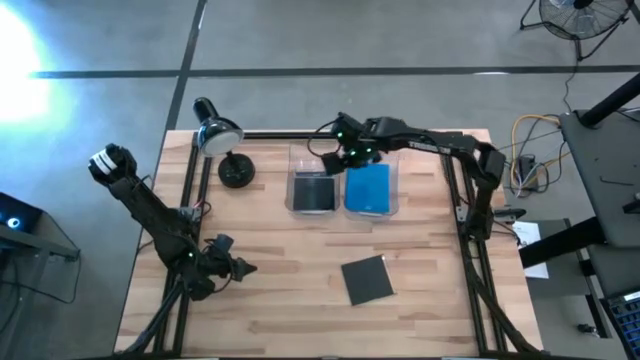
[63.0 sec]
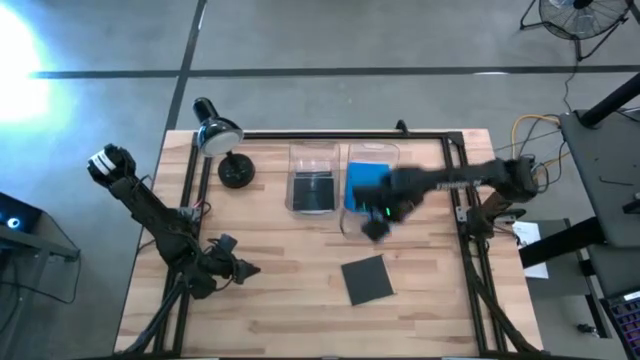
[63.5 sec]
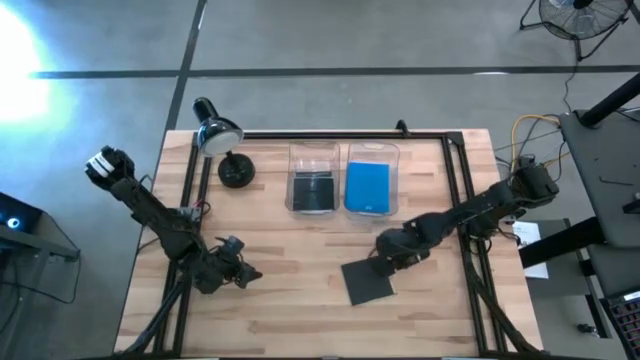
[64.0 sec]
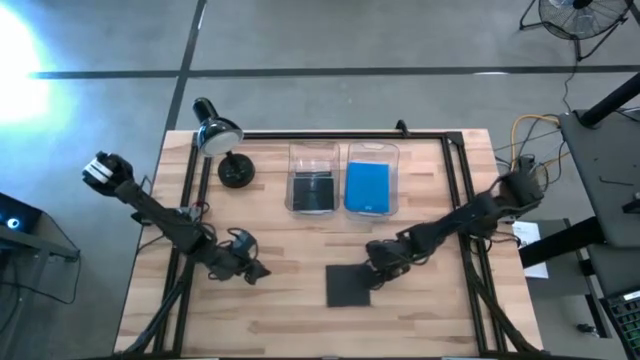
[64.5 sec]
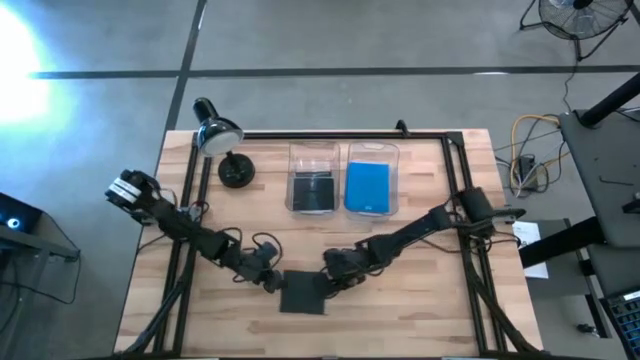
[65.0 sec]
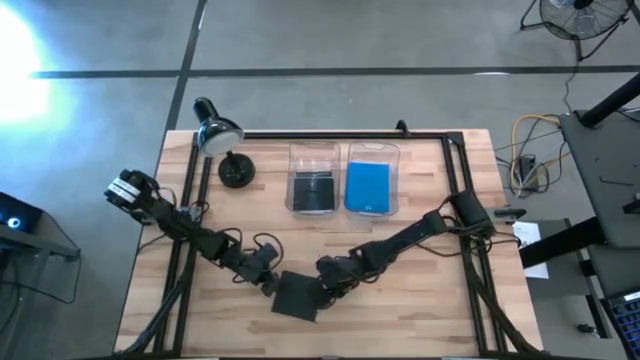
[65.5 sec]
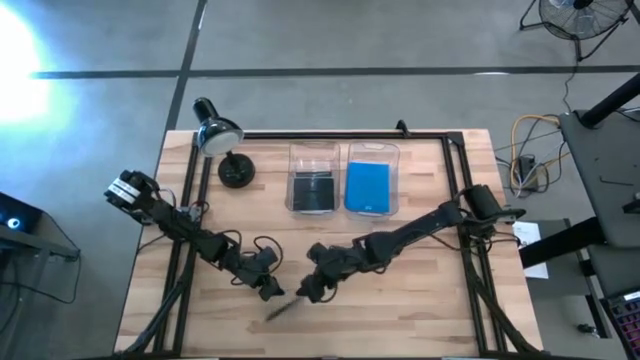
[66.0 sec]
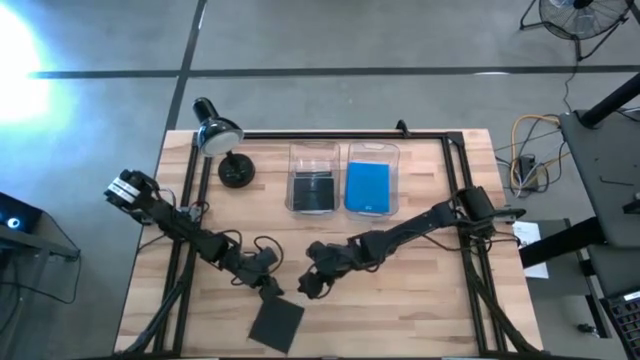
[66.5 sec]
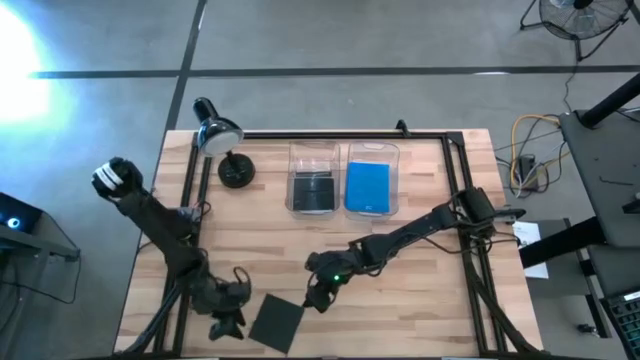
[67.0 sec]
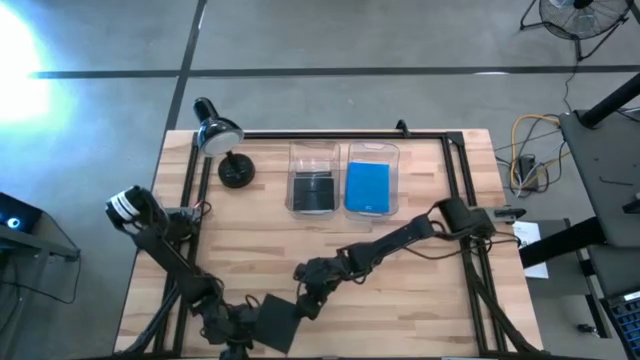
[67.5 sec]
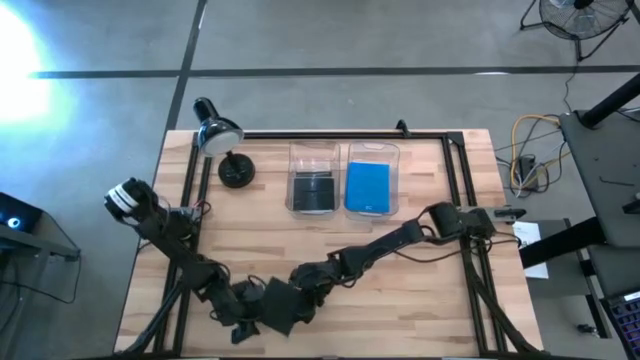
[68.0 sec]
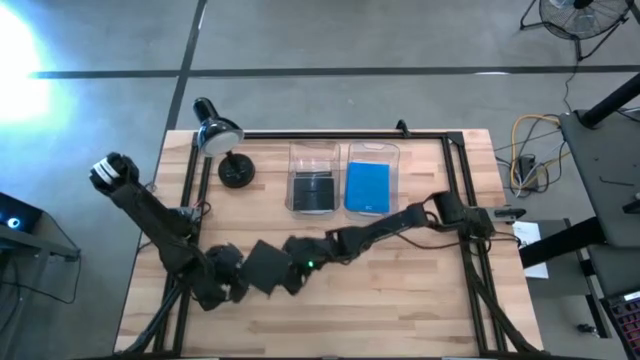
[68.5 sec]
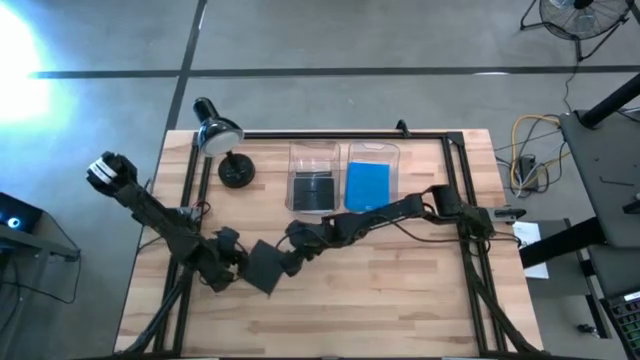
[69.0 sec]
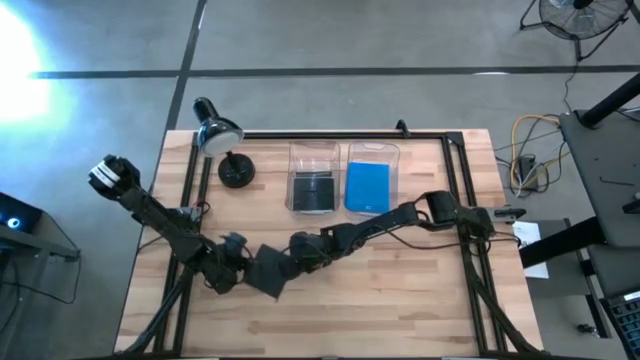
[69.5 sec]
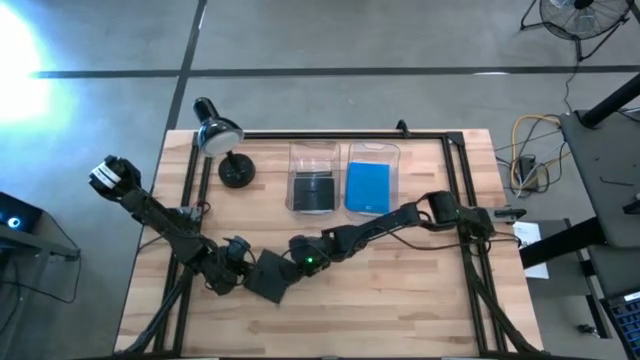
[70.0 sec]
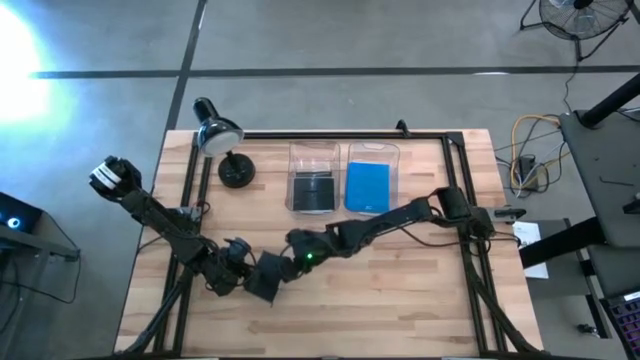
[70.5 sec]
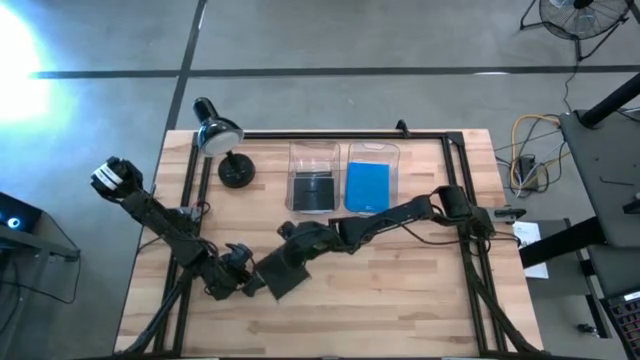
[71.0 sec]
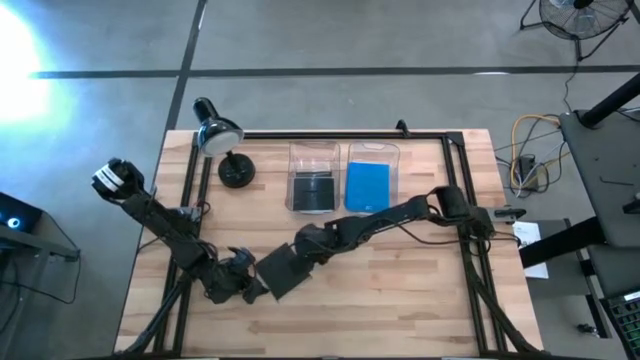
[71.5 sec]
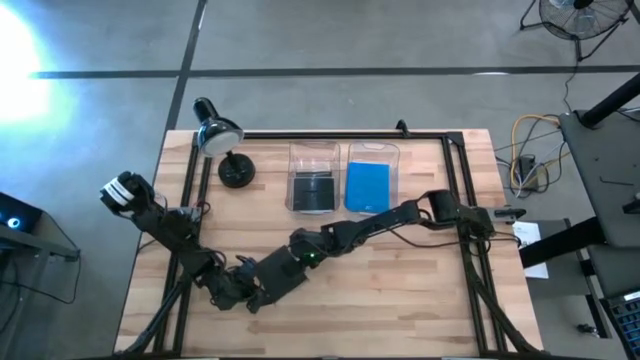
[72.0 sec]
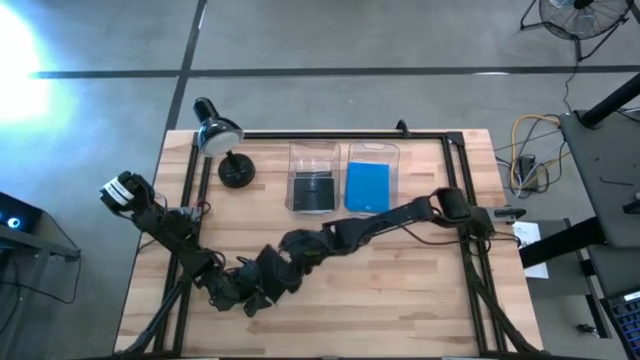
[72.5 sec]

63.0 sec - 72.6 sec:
Task: Pick & place jewel cases by type
Put the black CD case into the left transparent bin

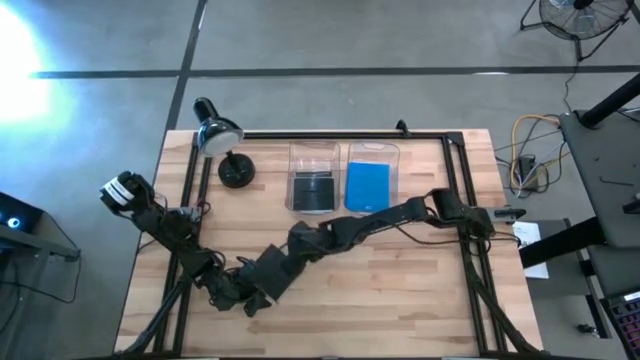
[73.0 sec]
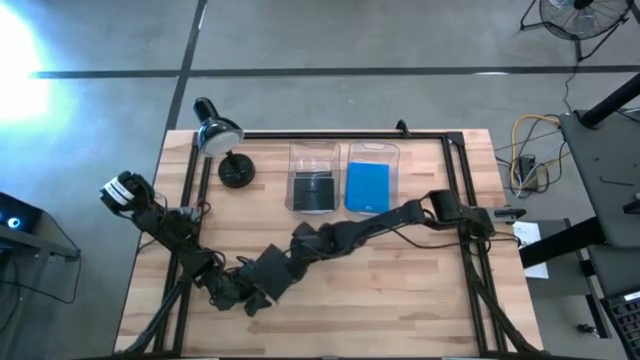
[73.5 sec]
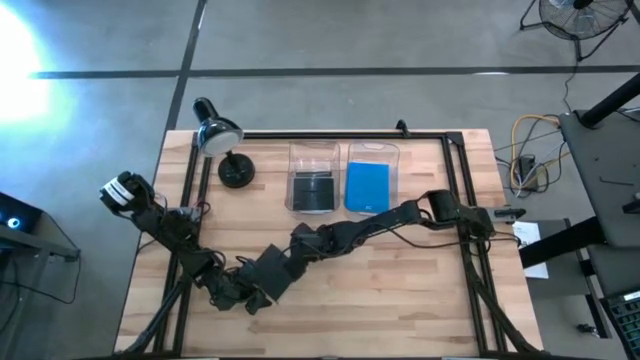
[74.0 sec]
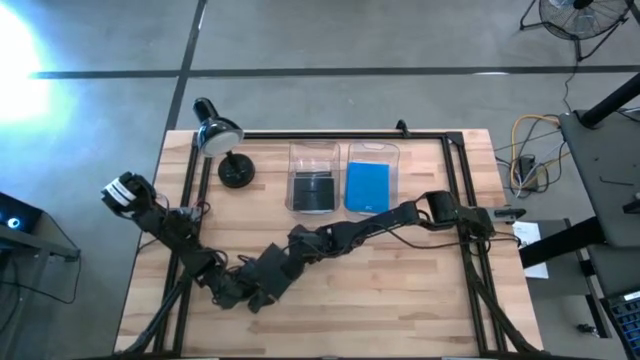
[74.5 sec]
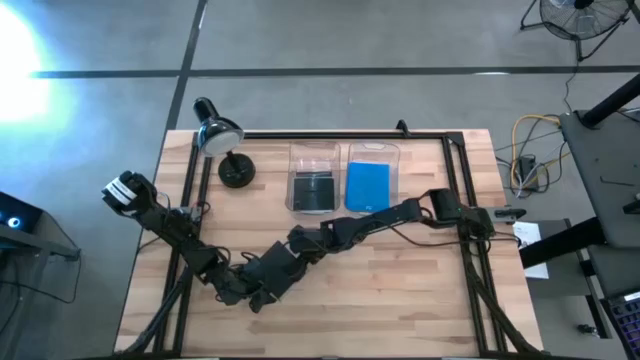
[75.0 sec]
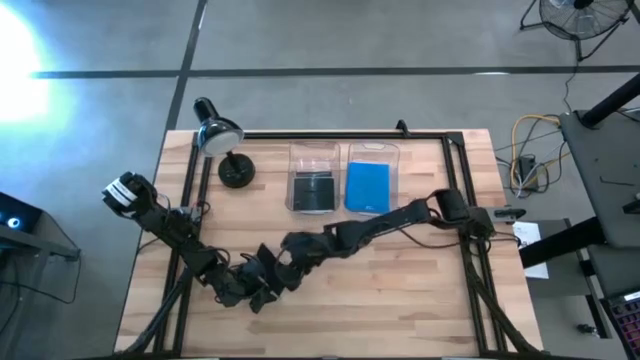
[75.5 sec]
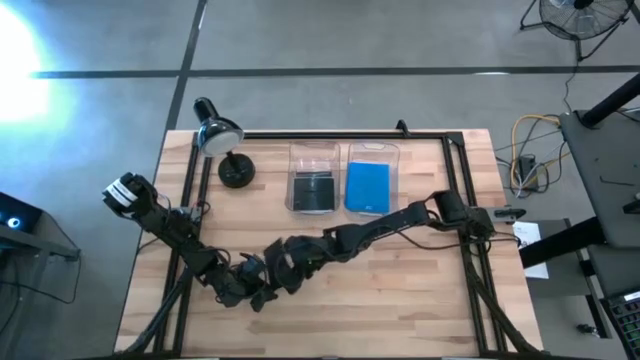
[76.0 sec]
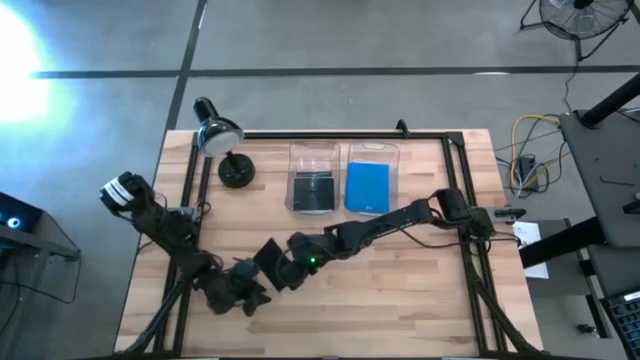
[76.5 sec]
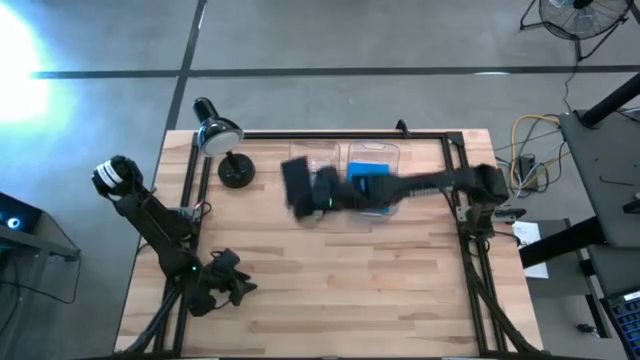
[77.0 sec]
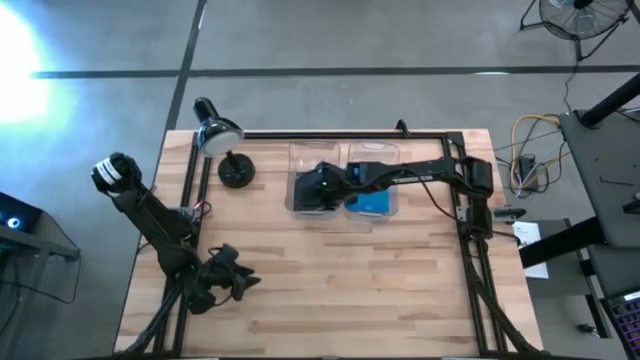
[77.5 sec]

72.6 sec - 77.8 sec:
Put the black CD case into the left transparent bin

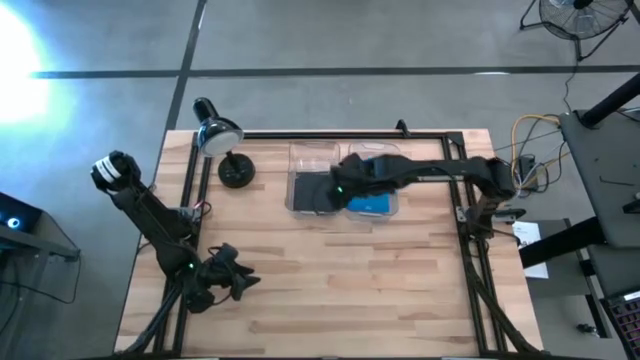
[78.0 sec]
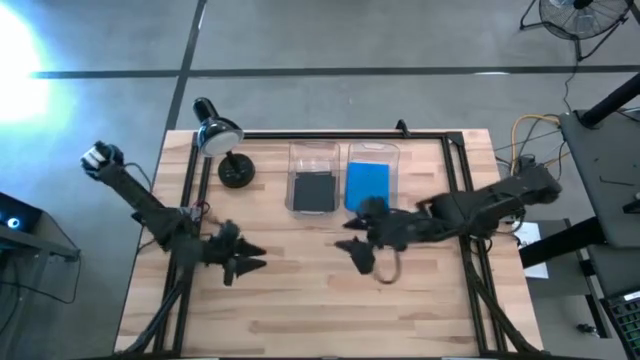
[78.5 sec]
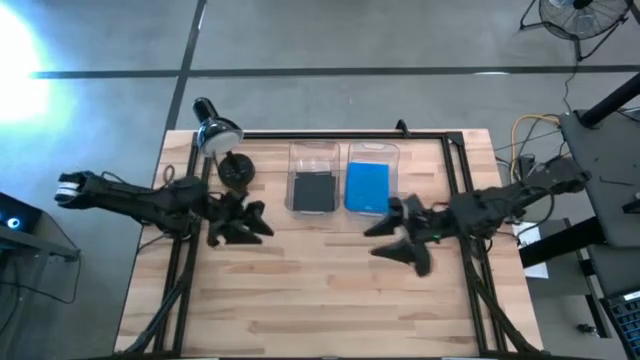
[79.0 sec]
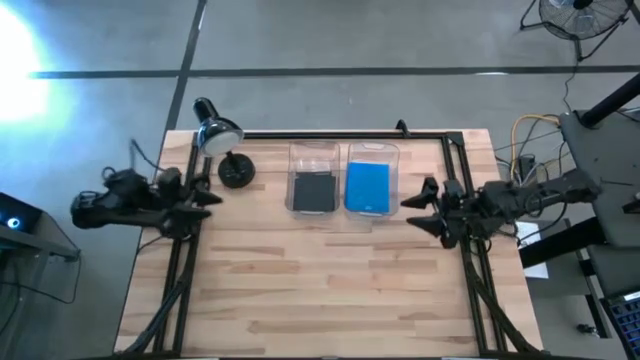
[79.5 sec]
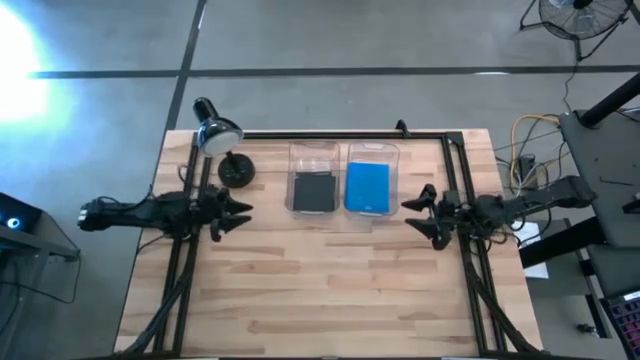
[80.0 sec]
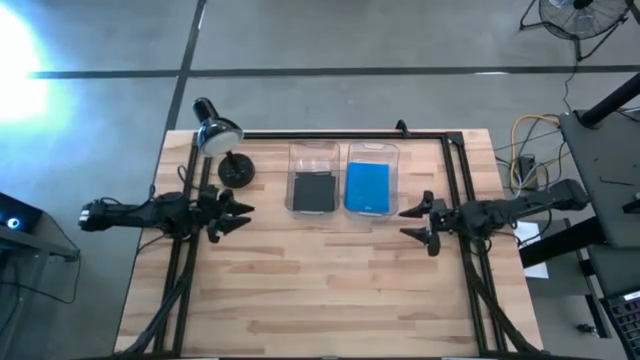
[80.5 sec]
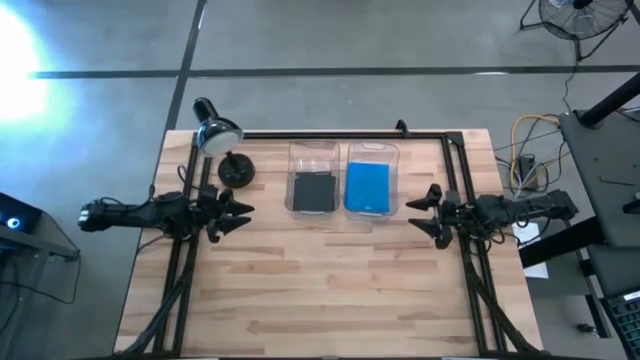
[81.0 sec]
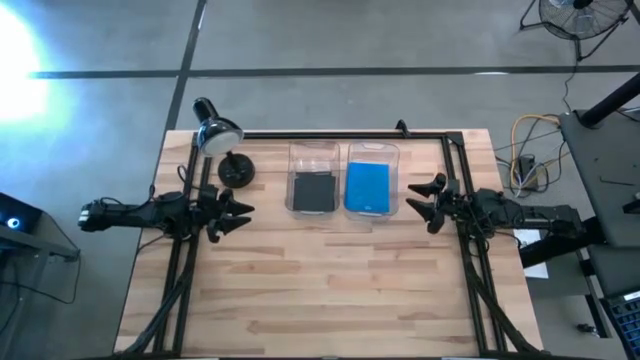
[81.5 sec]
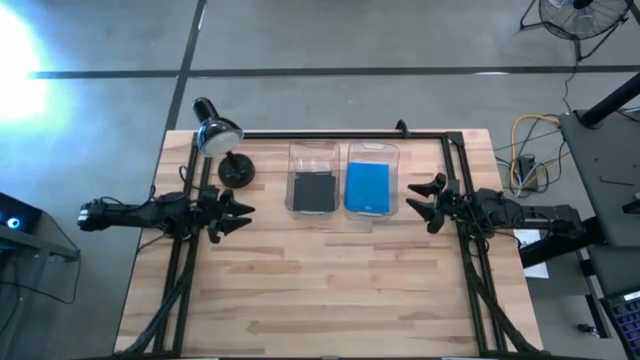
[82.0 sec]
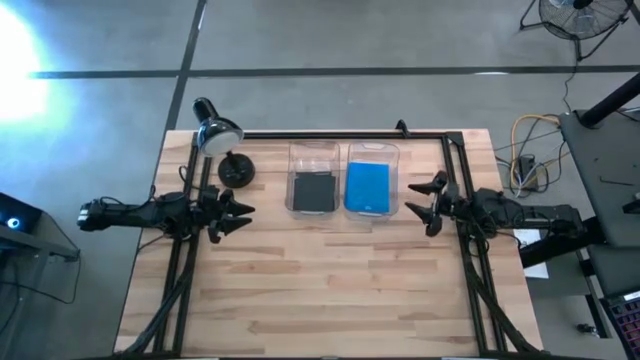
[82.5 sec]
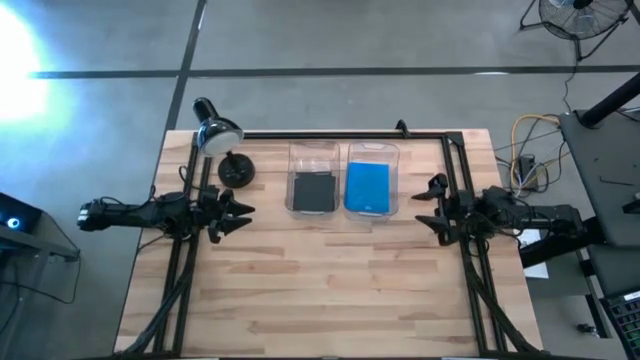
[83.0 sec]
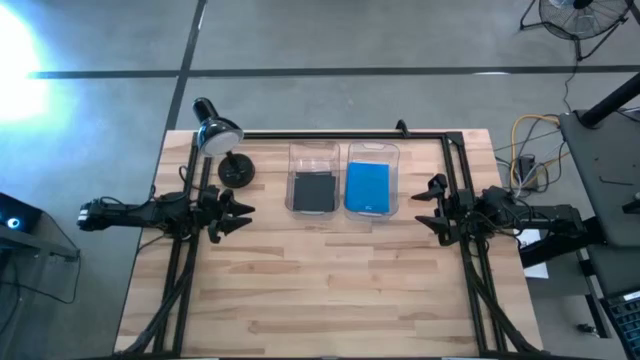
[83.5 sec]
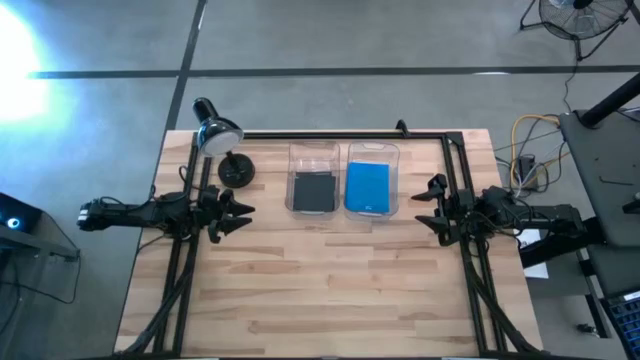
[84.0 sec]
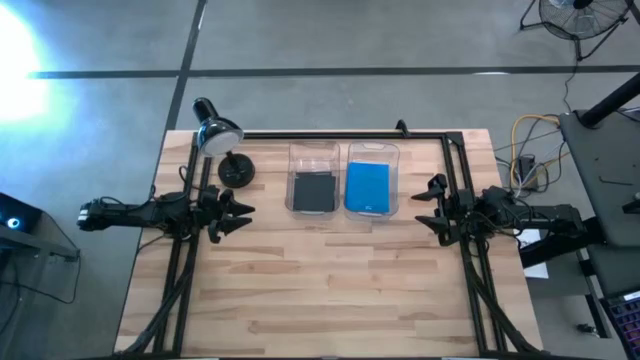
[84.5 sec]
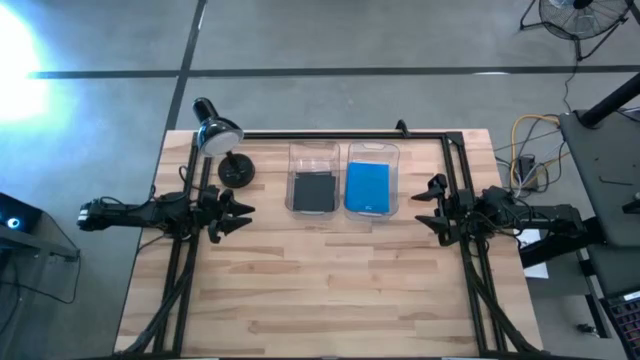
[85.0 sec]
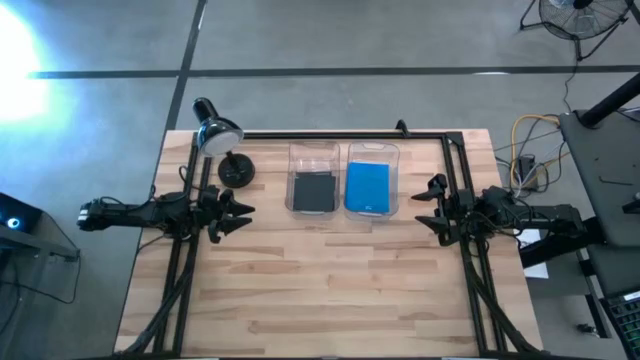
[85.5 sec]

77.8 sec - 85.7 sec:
Return to Home Position
